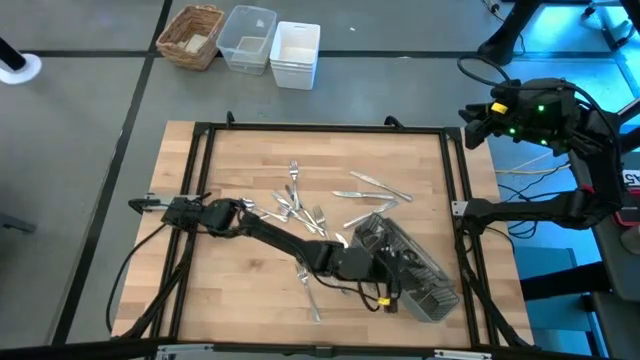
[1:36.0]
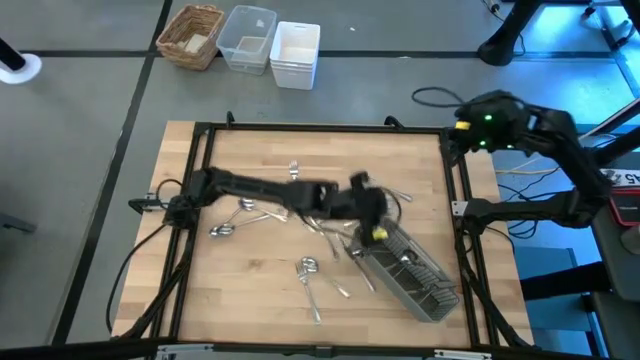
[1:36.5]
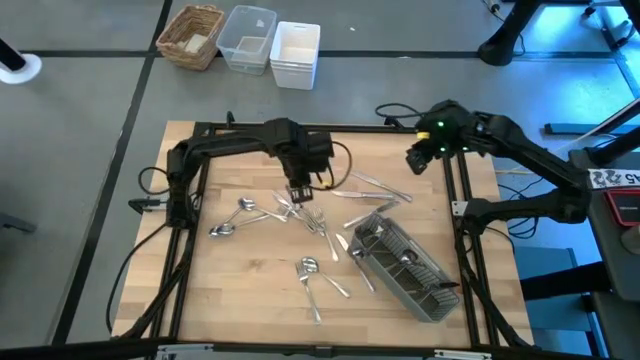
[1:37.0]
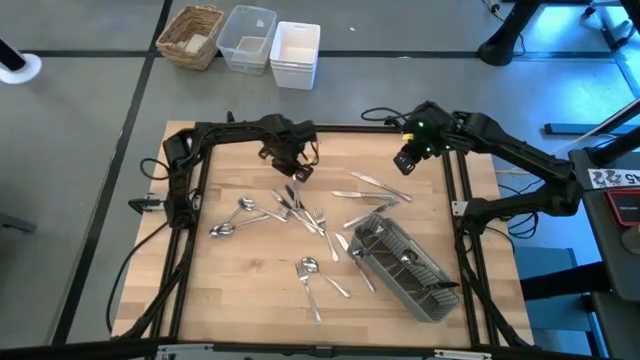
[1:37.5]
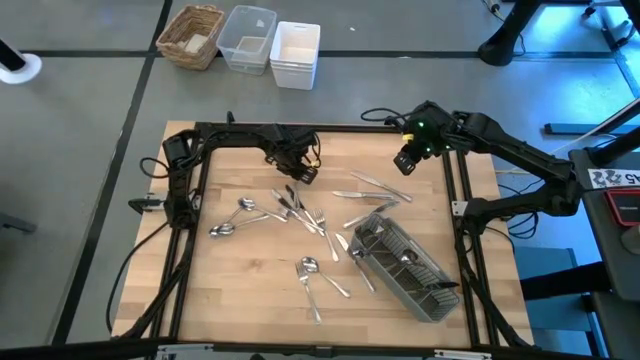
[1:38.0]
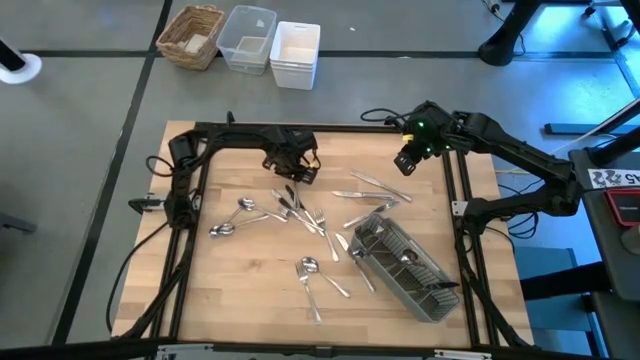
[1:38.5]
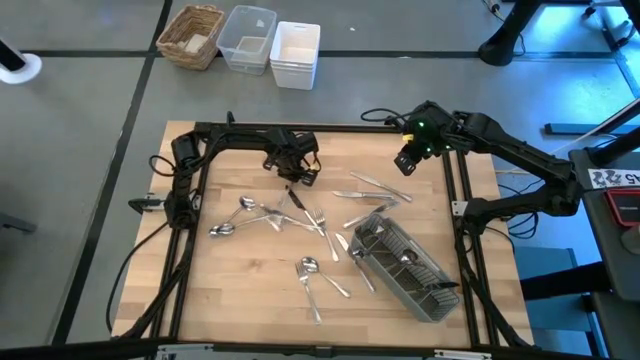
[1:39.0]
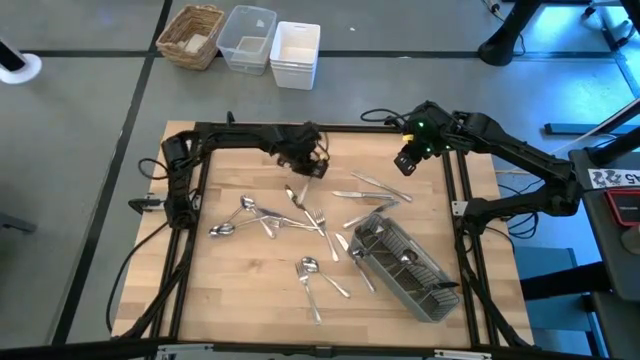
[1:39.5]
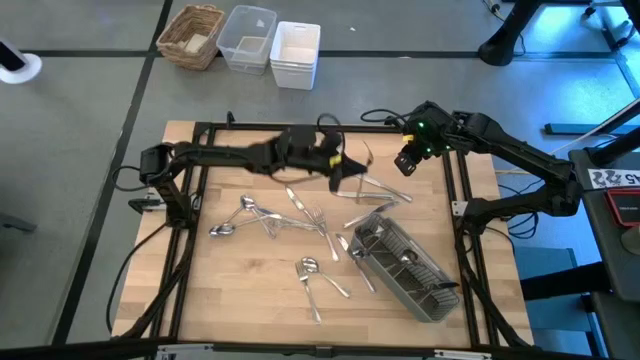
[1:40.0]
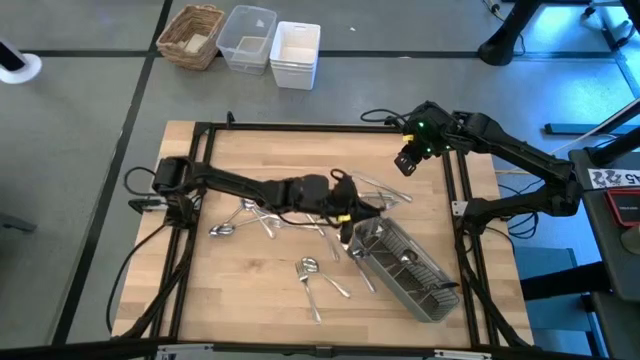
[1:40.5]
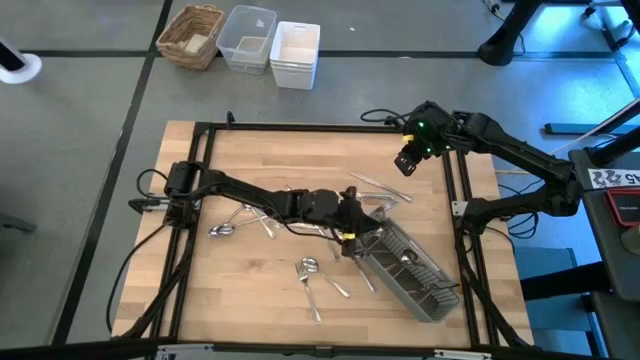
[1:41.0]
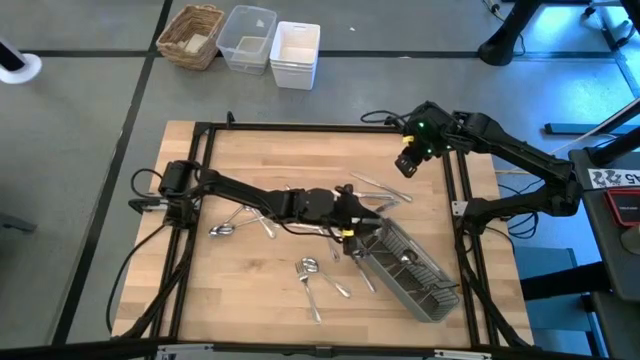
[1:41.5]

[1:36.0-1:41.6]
Task: Sort silverware
Put the silver fork into the gray silverware basket

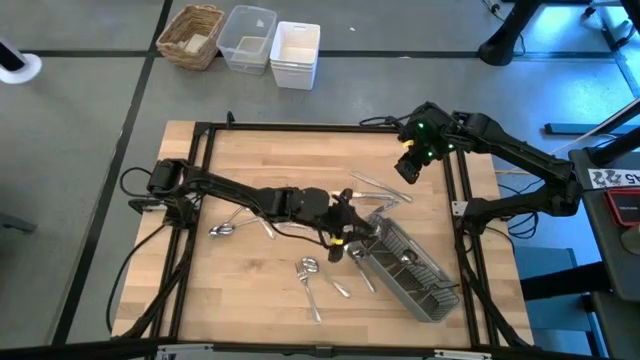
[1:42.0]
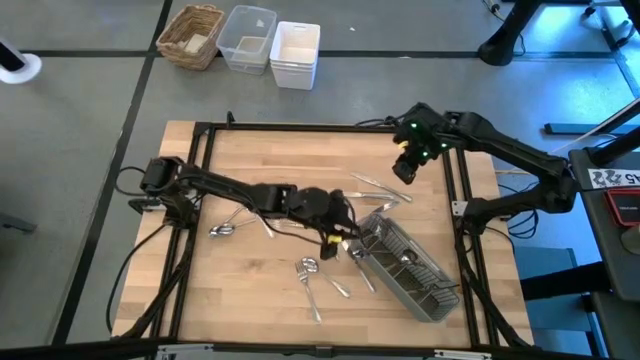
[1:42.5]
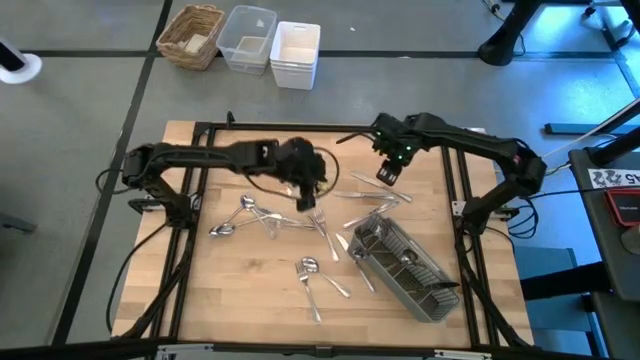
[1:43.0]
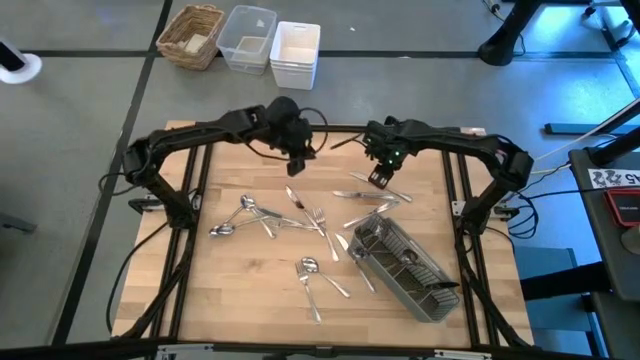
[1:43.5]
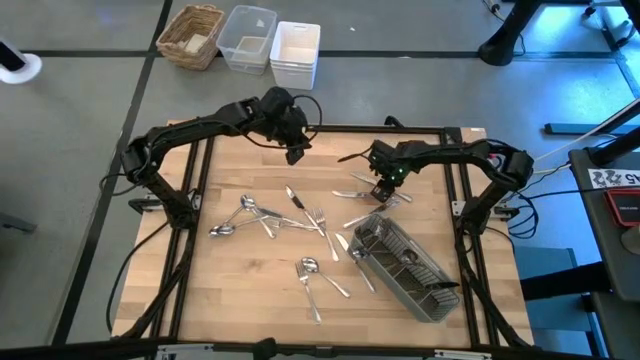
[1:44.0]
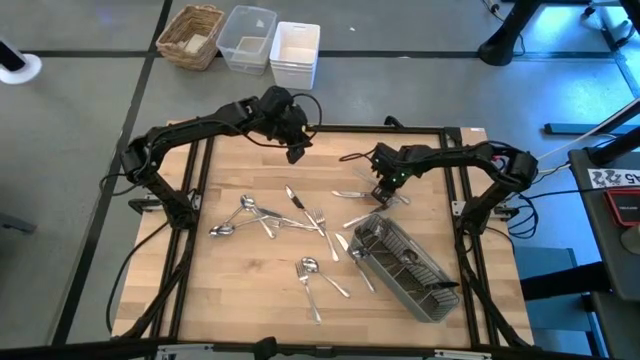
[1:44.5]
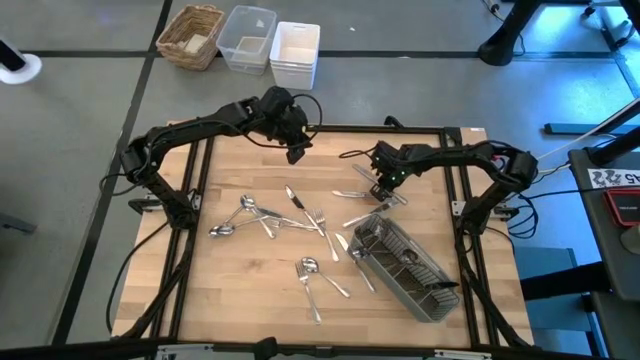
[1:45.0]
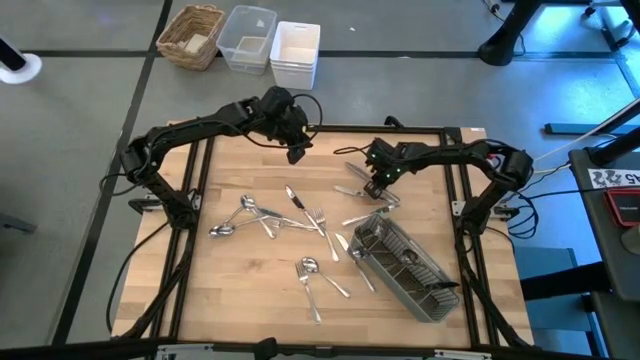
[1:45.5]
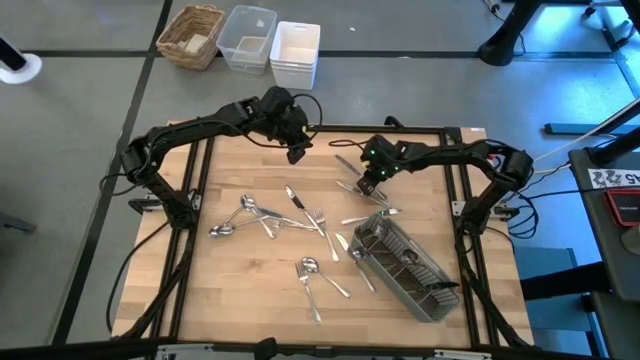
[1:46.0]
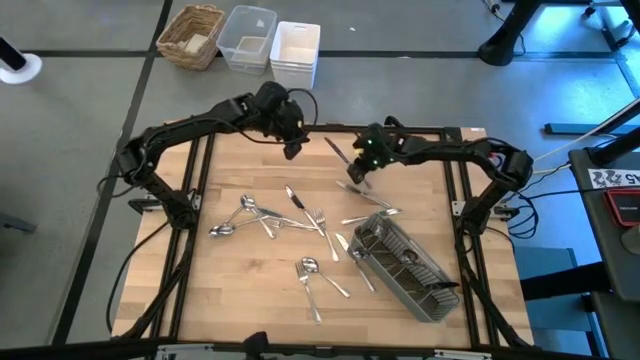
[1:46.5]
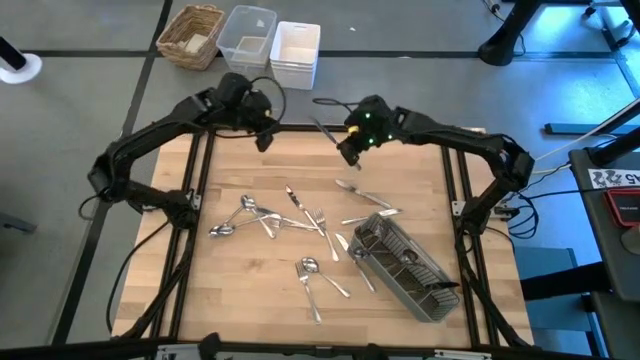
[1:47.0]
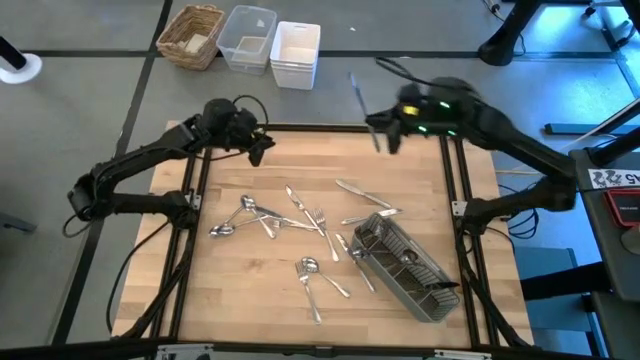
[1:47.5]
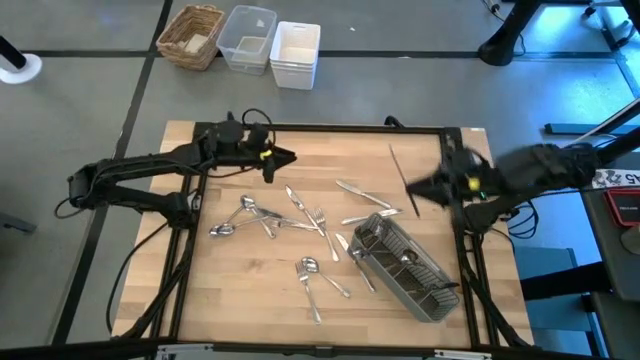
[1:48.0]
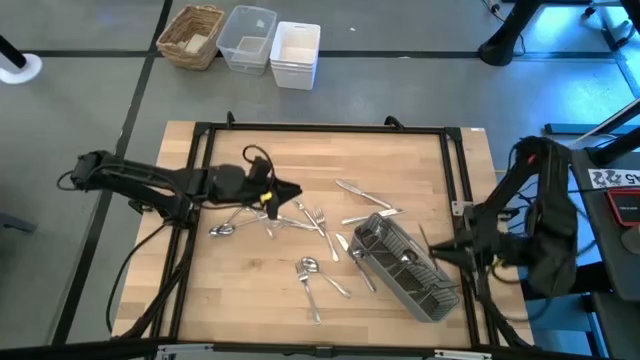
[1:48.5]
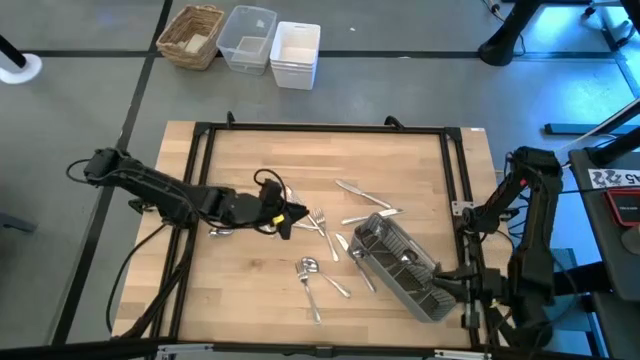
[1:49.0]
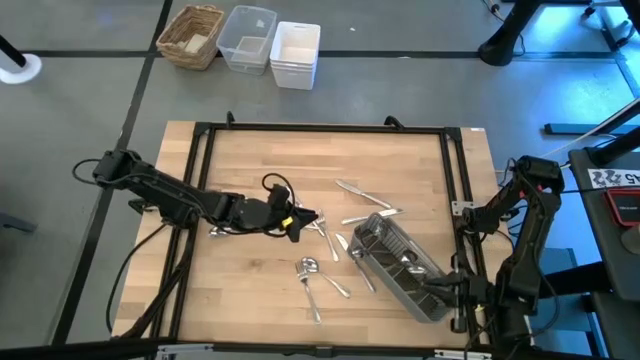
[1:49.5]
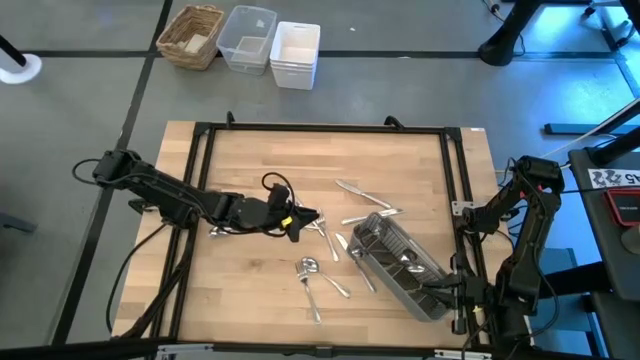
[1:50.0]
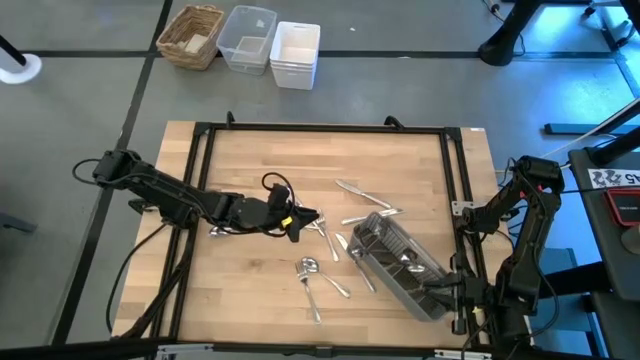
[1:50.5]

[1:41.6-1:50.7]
Put the silver table knife into the gray silverware basket

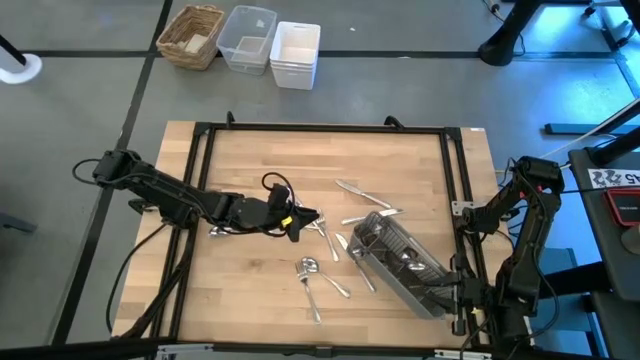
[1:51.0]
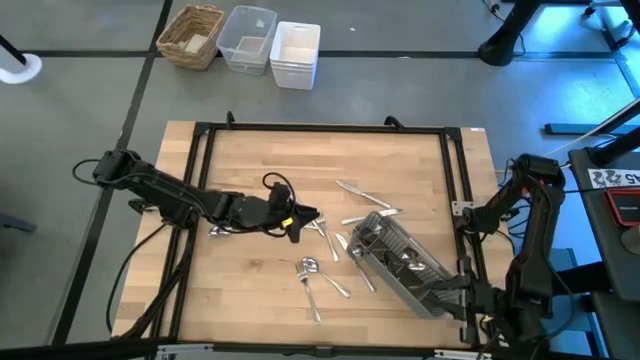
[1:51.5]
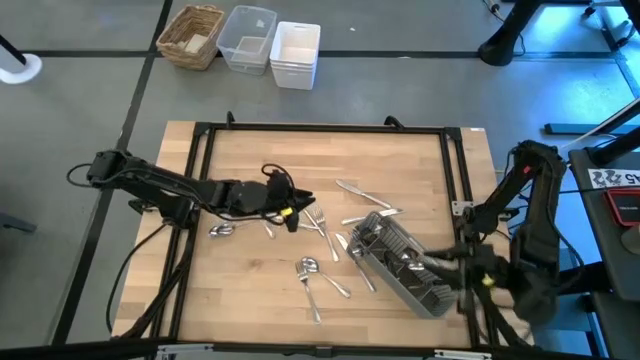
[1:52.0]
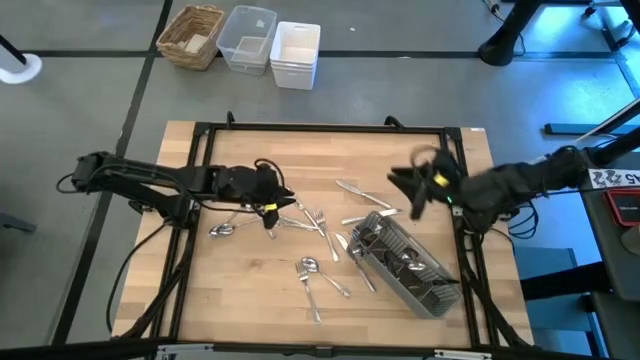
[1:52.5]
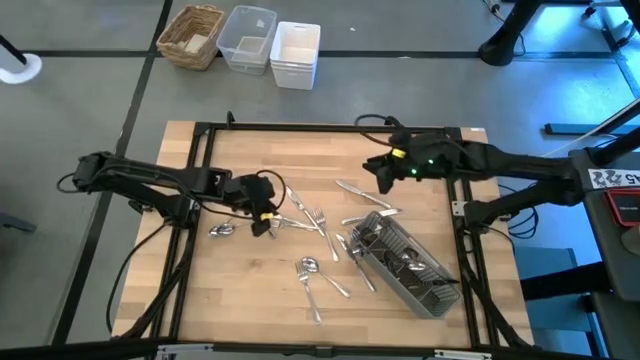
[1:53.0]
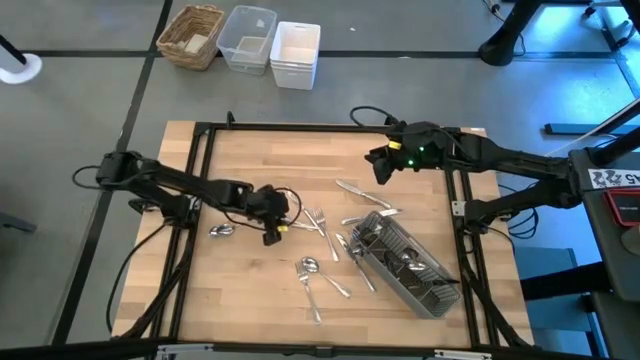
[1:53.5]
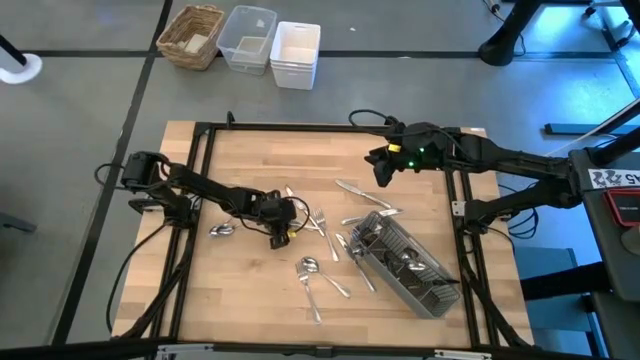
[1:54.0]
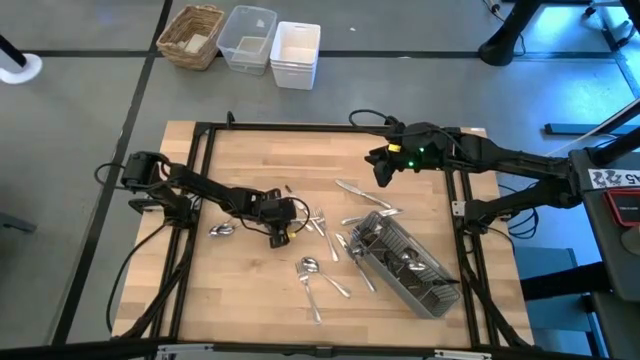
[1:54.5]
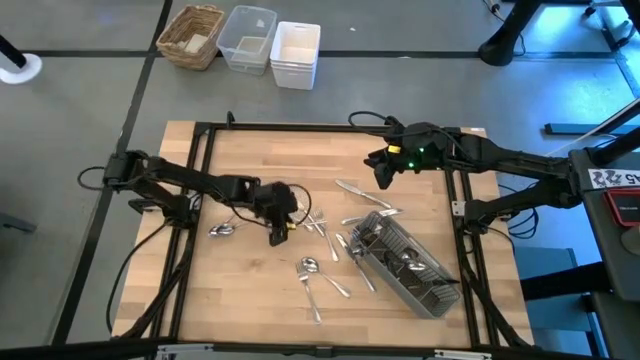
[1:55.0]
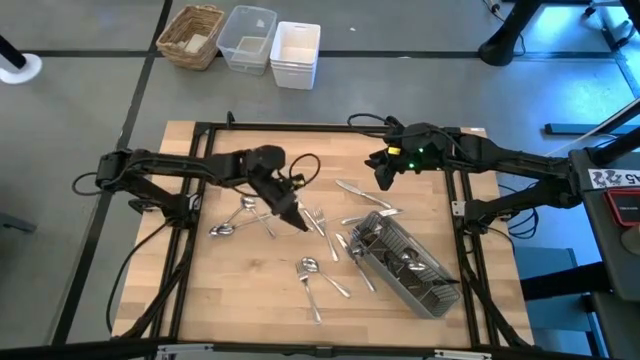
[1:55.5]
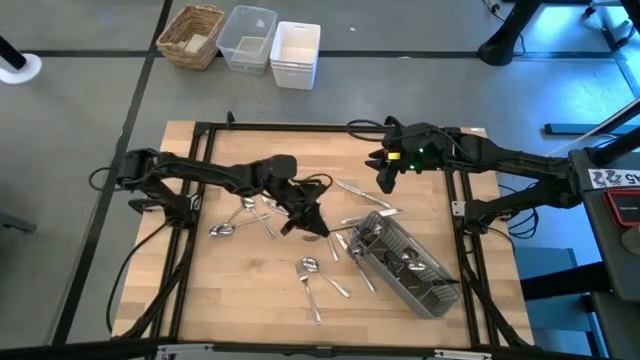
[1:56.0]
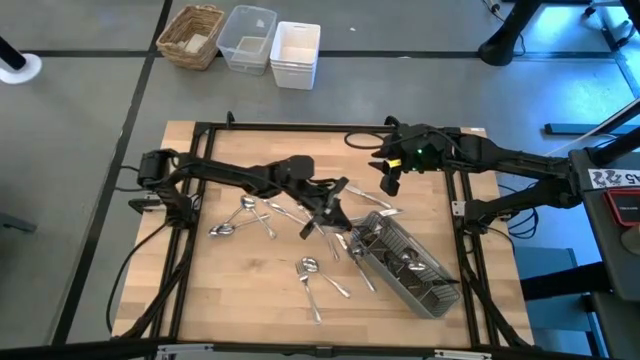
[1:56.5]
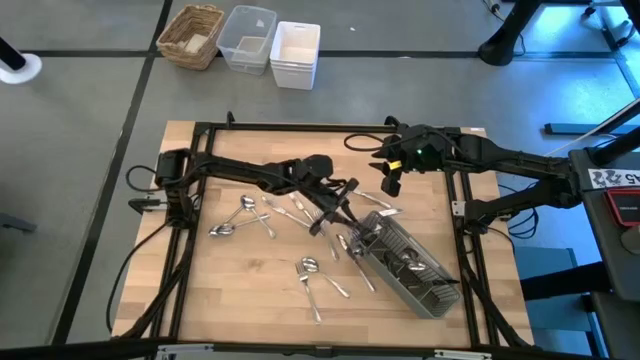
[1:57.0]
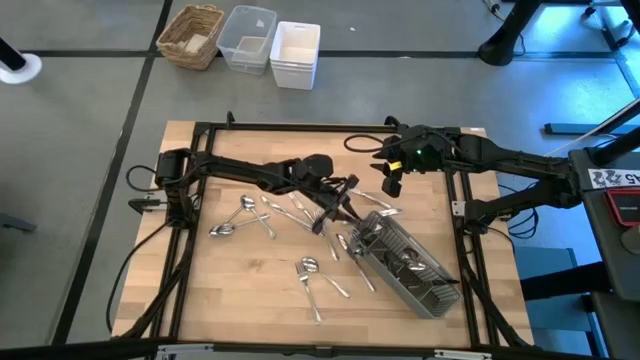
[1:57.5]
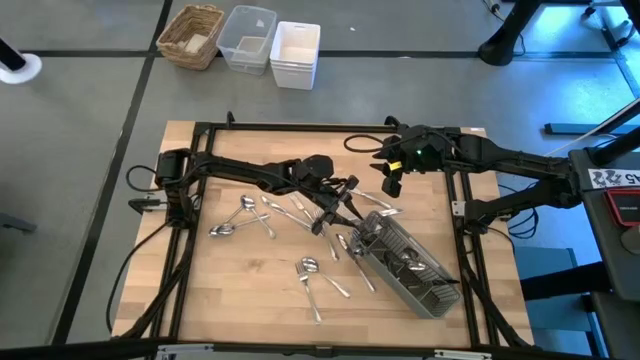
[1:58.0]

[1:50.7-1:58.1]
Put the silver fork into the gray silverware basket
